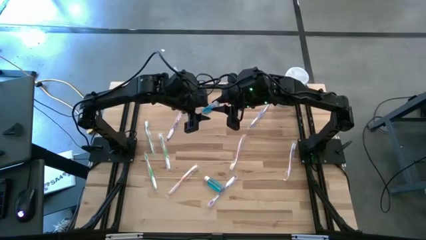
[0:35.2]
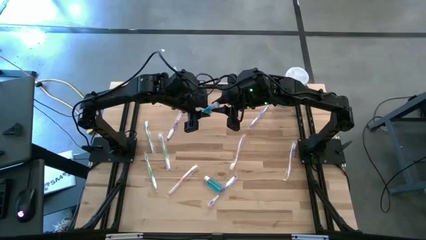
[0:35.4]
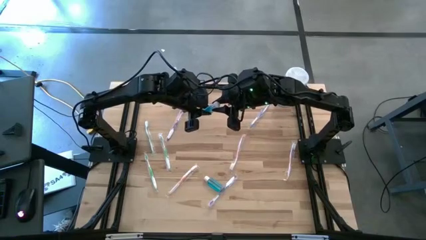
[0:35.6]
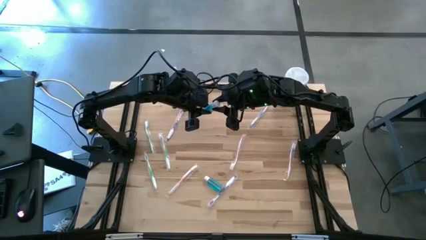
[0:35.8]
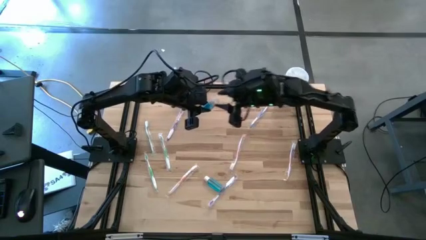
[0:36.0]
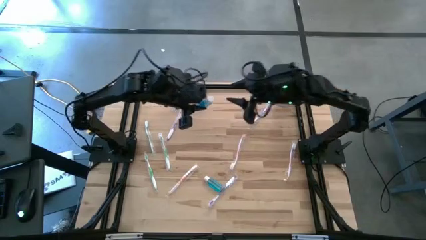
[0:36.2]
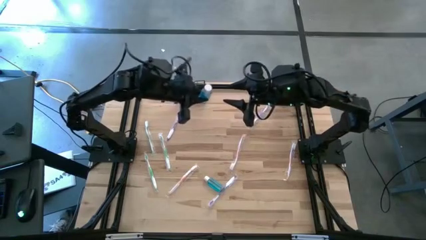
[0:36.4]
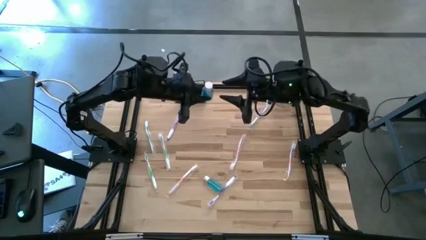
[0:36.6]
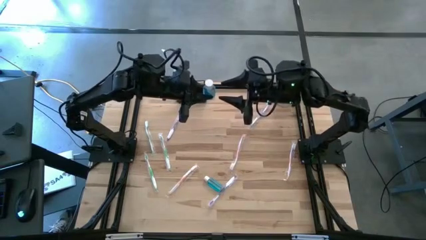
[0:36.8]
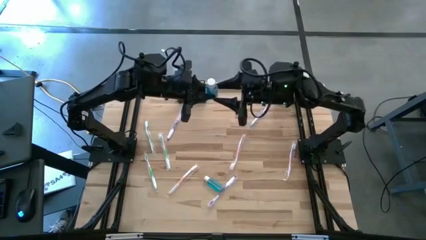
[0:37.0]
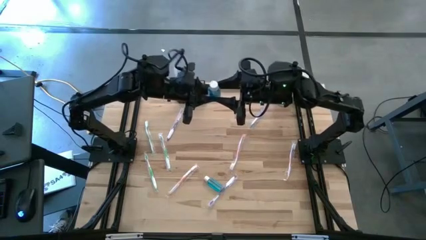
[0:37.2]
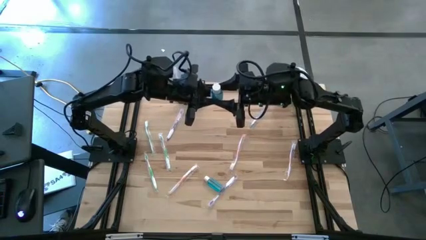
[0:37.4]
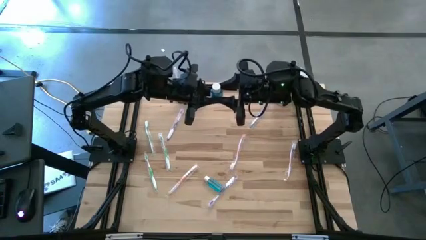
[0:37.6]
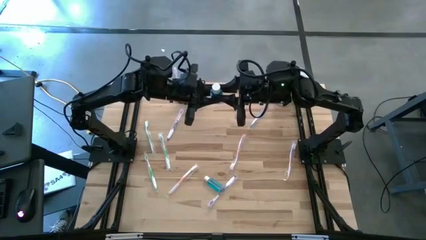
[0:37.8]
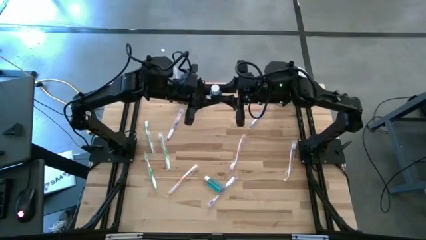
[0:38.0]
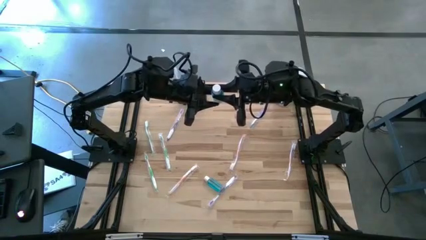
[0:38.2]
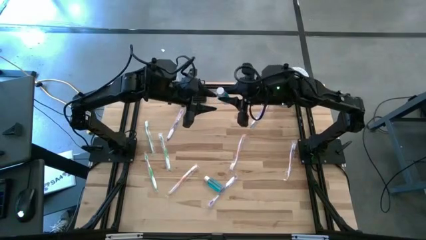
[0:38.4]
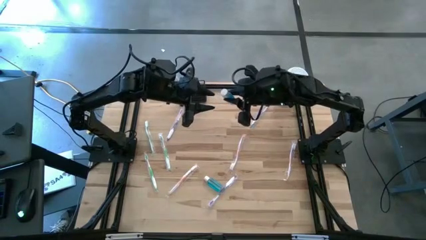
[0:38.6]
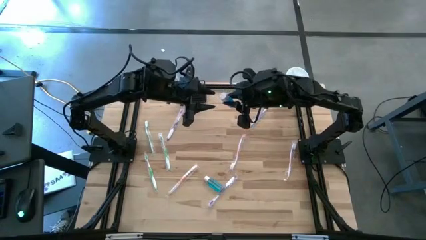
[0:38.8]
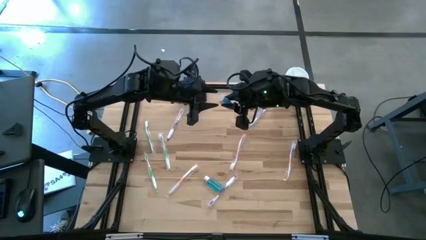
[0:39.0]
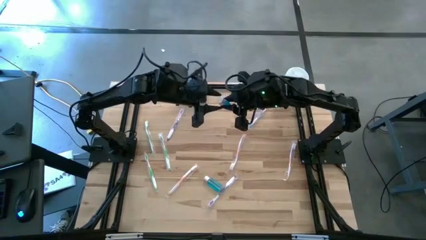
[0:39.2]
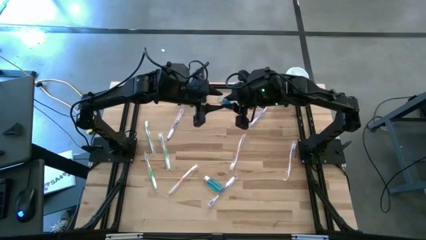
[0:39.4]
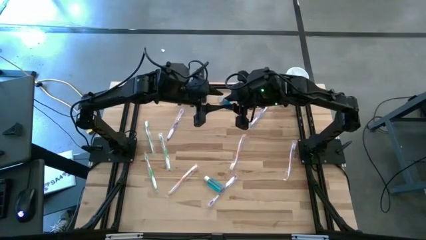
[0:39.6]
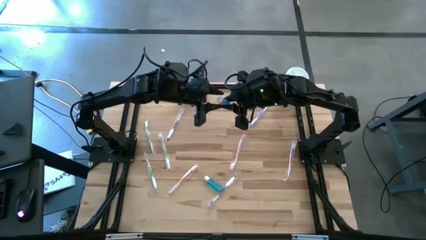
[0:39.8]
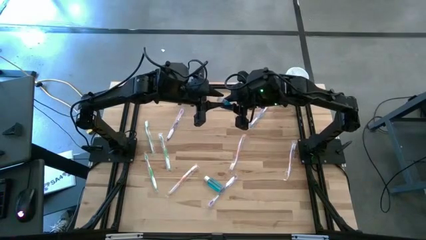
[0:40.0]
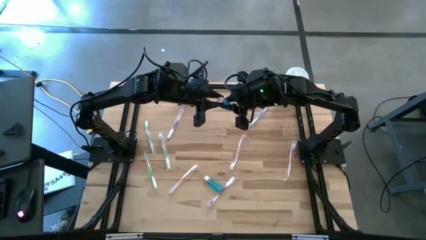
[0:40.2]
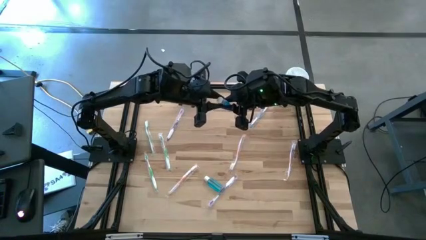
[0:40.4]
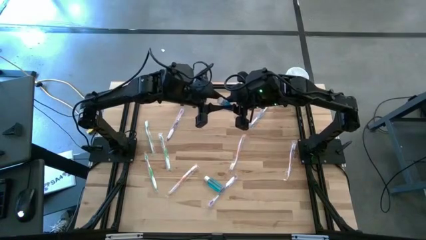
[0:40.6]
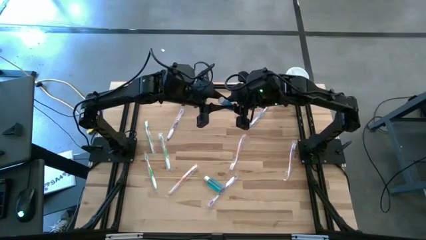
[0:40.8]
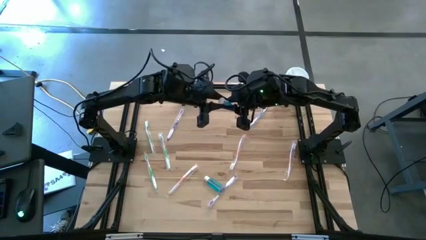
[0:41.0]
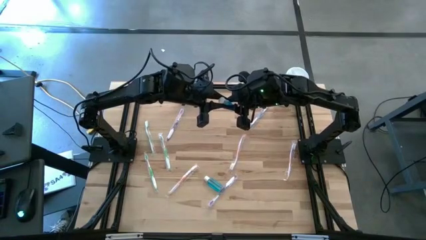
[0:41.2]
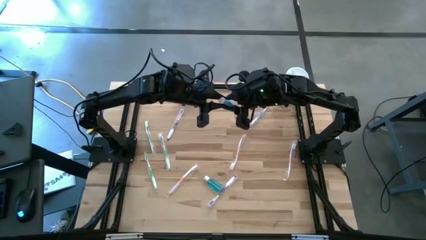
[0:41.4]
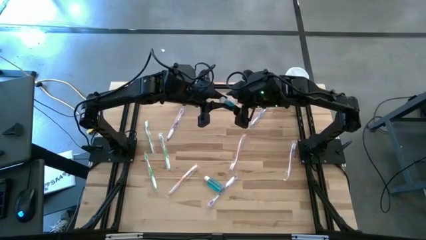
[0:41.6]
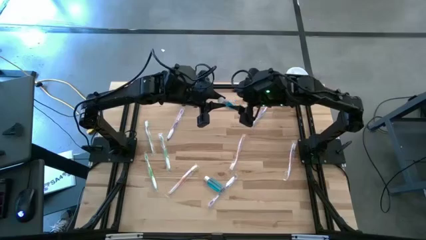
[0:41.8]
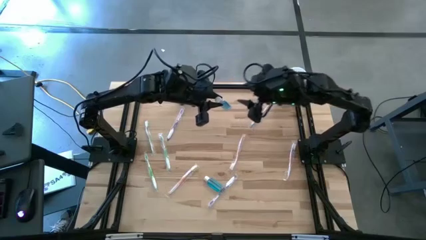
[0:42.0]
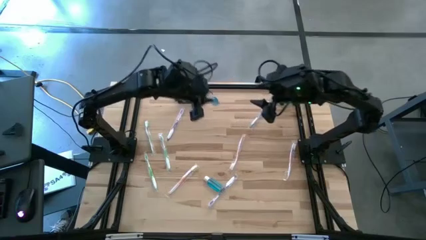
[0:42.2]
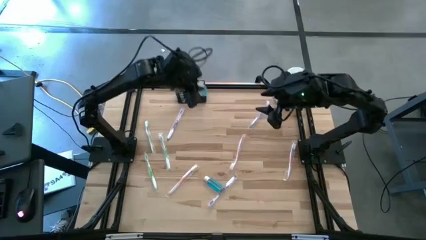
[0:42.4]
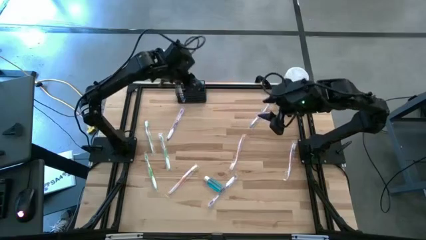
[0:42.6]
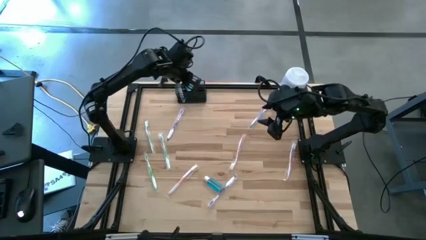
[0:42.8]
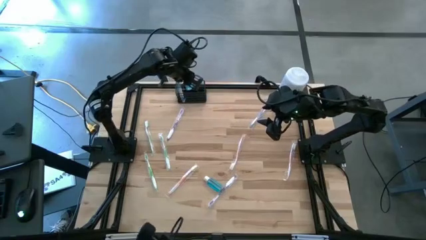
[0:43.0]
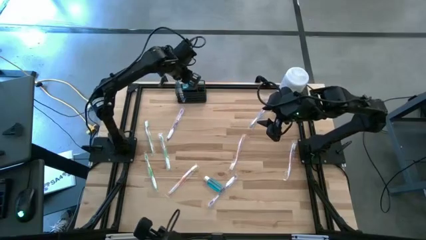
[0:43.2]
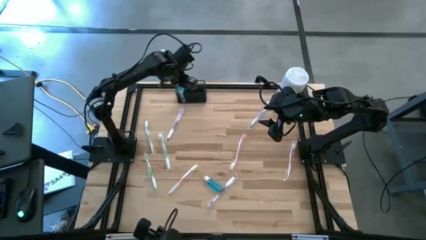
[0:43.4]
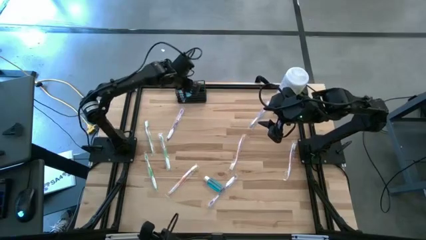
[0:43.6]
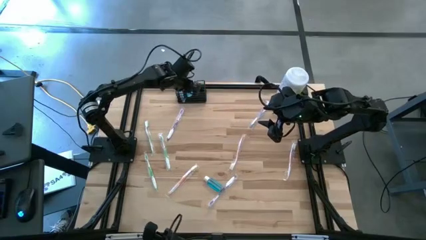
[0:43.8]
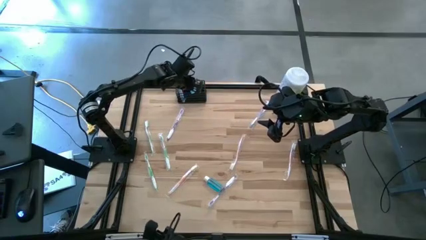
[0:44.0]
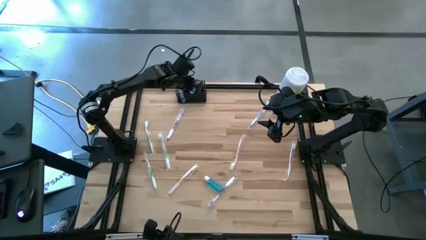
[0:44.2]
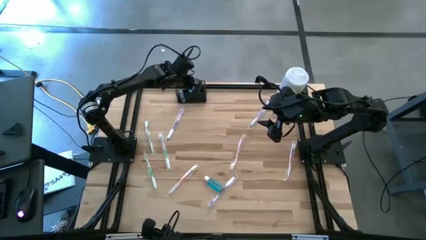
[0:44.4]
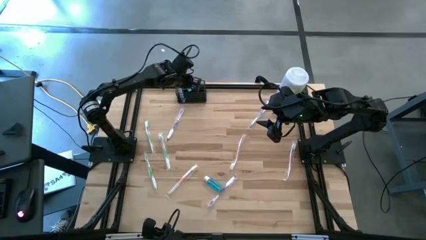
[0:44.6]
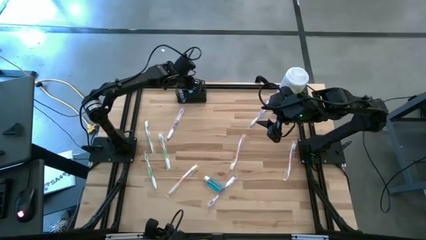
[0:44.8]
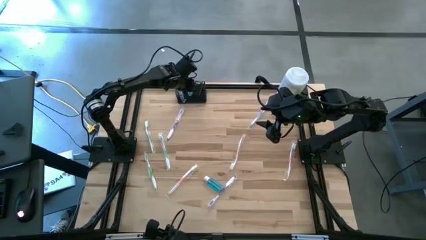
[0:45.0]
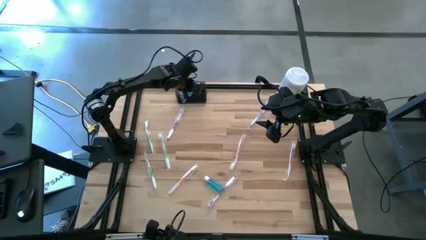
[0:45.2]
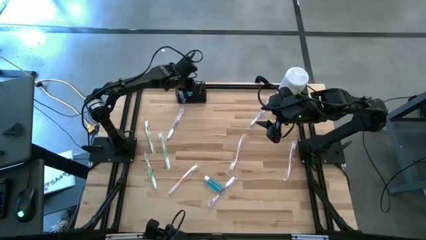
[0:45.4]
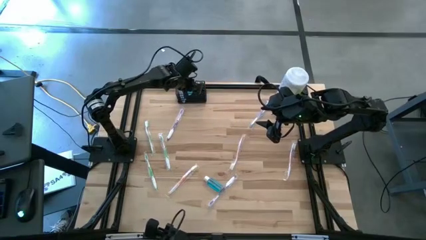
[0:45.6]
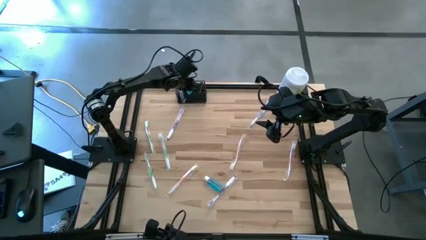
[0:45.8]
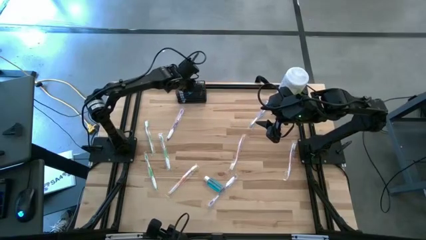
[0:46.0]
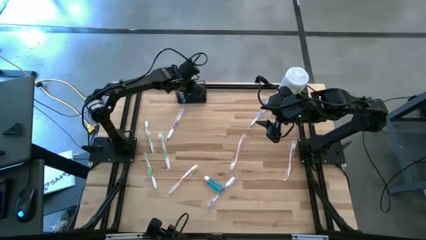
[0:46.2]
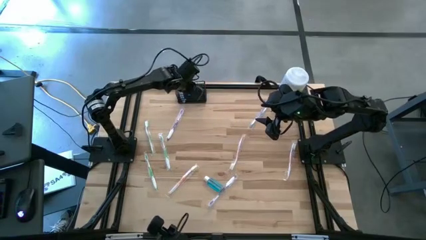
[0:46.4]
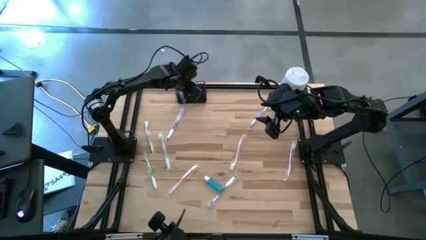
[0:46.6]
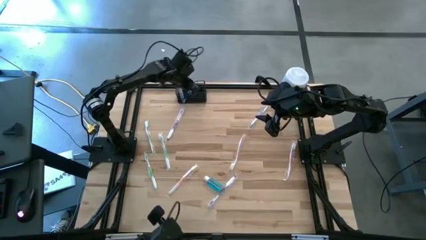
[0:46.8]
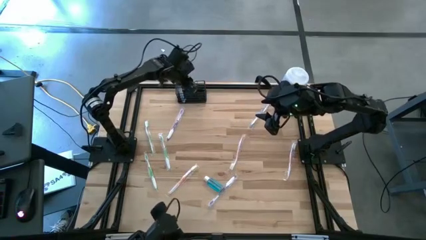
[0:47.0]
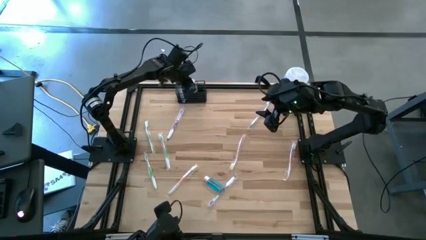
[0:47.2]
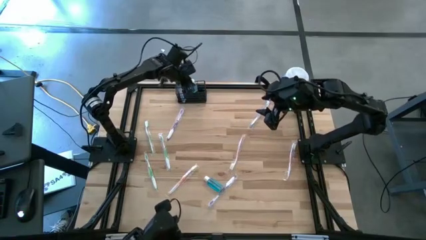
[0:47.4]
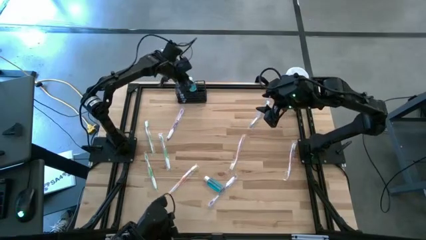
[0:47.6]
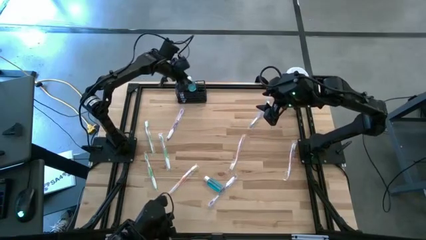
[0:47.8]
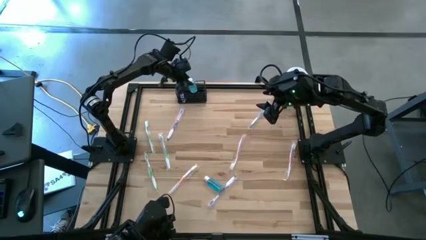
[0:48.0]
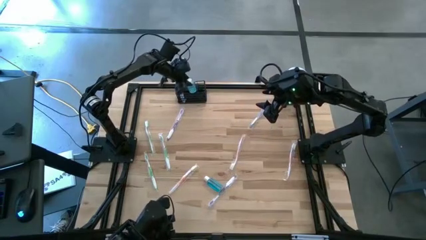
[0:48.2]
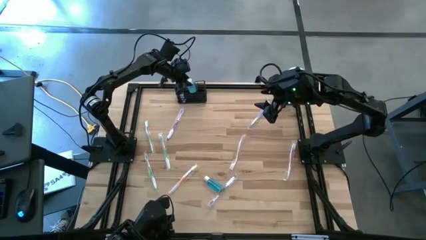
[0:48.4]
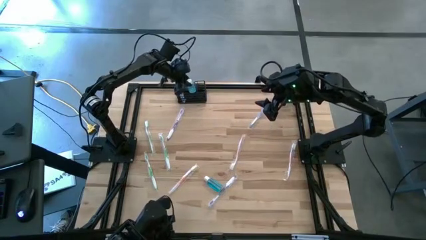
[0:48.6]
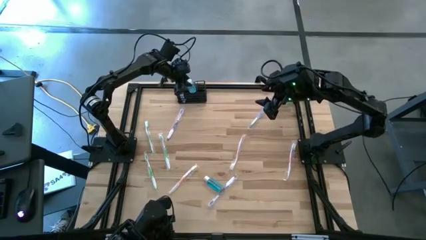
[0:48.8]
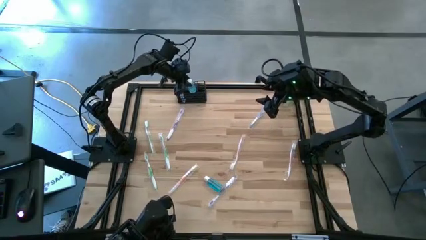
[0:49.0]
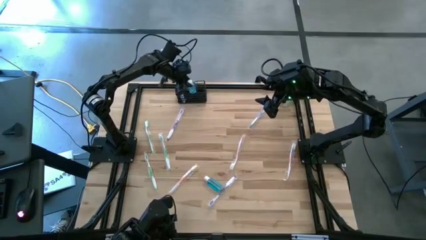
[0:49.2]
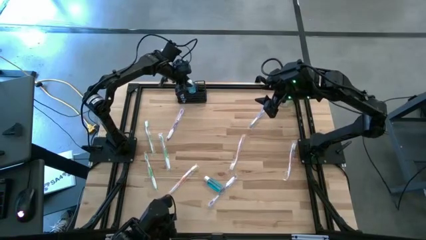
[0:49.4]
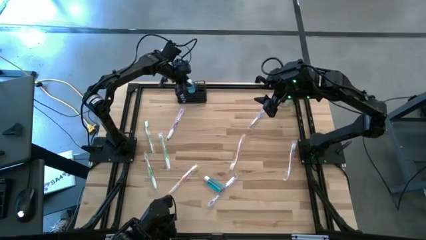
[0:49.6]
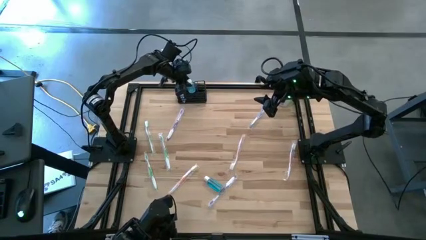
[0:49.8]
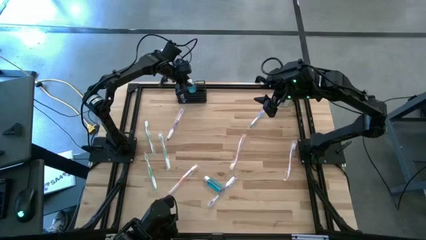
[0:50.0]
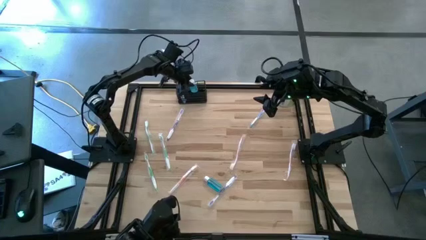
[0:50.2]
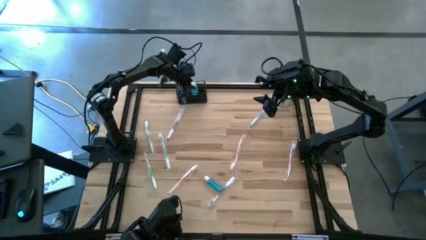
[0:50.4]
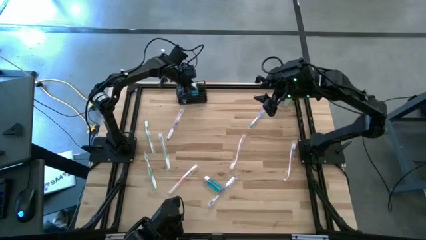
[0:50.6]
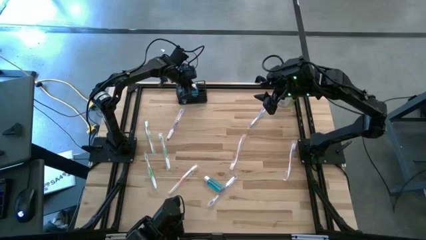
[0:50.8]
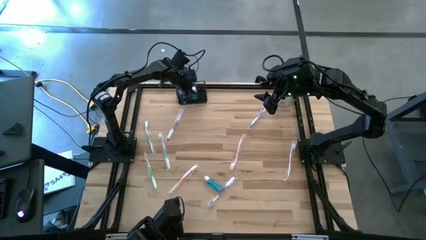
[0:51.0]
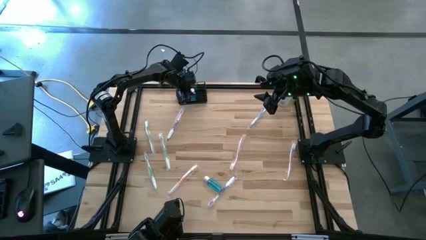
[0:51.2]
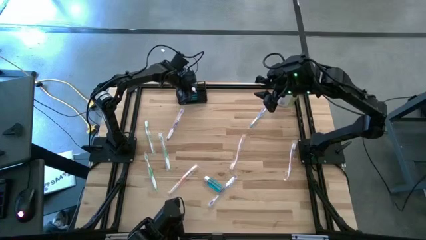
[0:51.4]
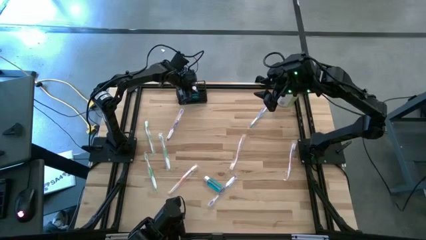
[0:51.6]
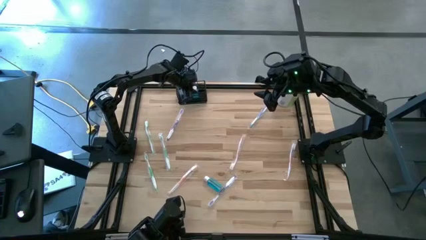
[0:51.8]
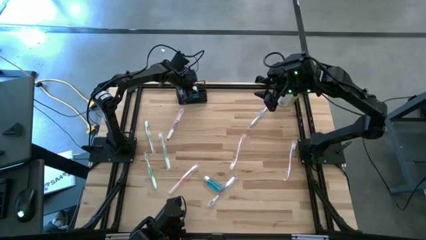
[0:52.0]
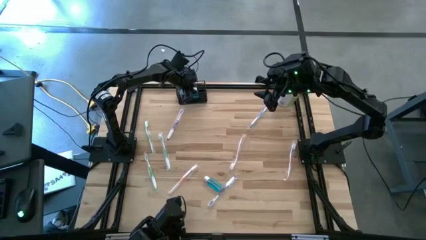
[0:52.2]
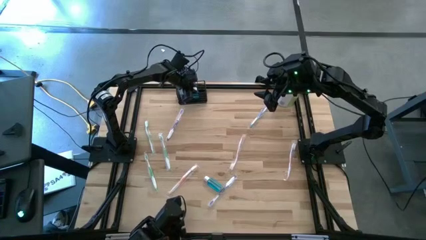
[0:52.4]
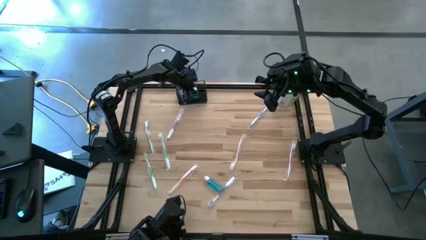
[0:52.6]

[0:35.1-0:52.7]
Task: Pick & Place toothbrushing station
Put the top blue mouthwash into the black wire organizer
